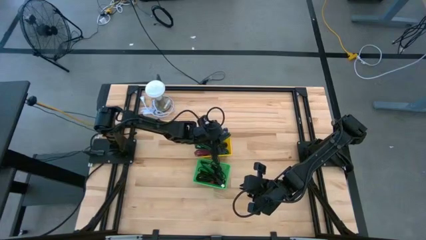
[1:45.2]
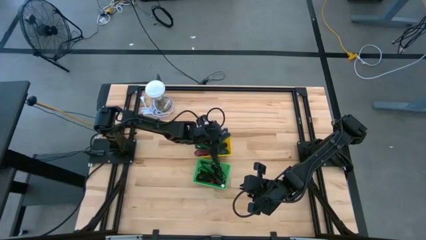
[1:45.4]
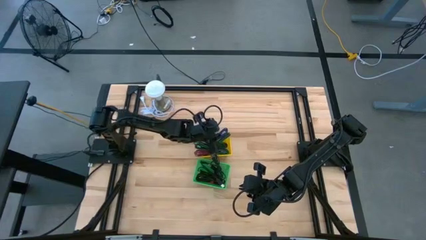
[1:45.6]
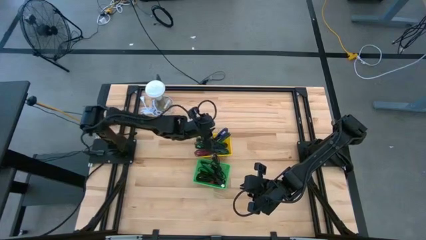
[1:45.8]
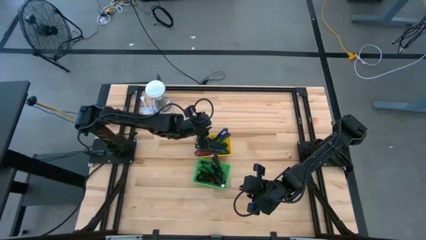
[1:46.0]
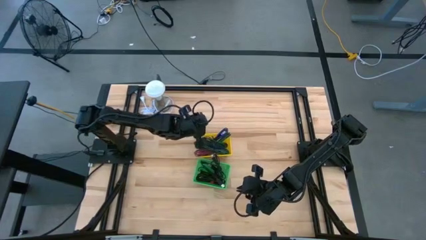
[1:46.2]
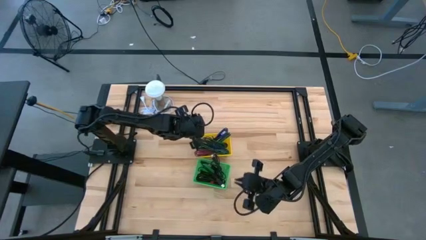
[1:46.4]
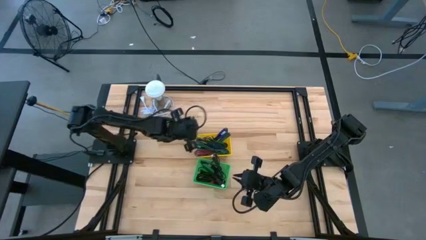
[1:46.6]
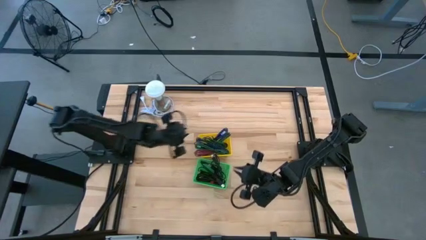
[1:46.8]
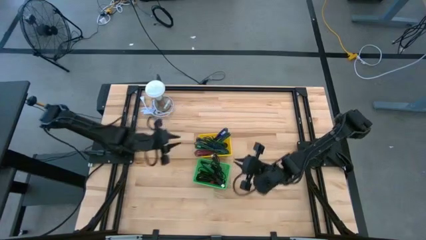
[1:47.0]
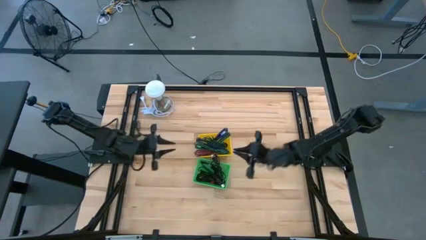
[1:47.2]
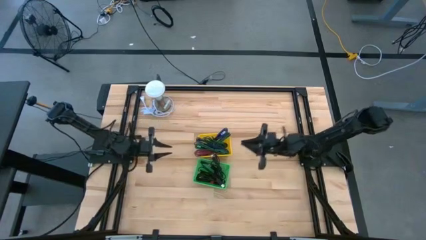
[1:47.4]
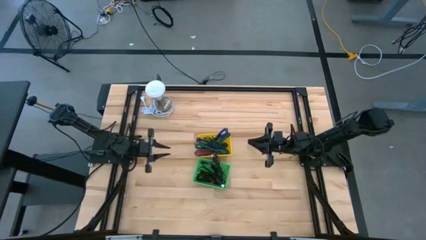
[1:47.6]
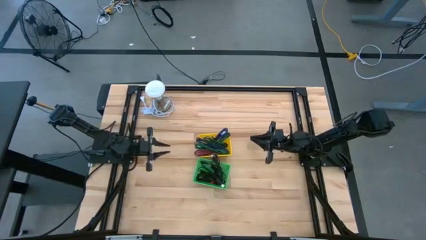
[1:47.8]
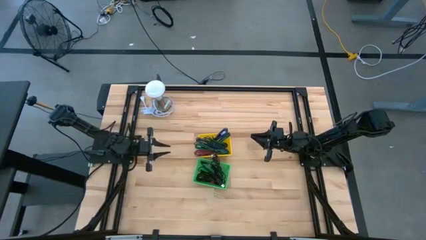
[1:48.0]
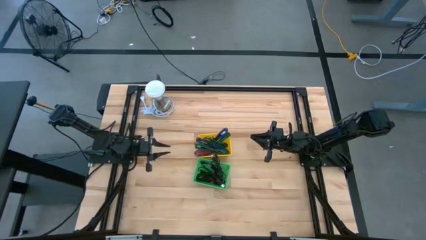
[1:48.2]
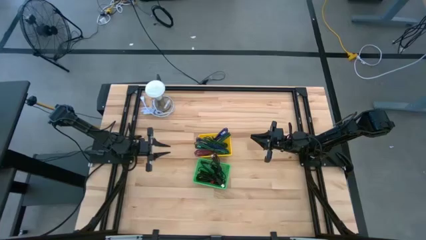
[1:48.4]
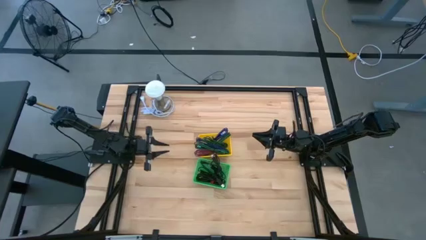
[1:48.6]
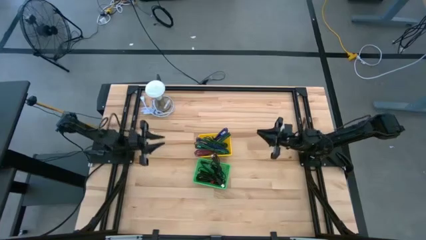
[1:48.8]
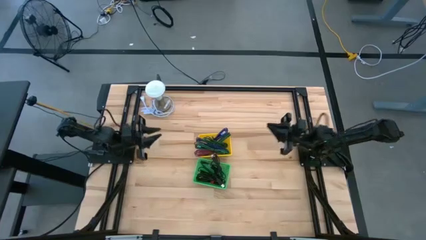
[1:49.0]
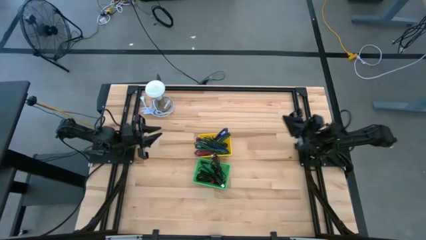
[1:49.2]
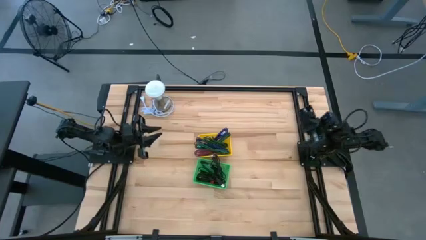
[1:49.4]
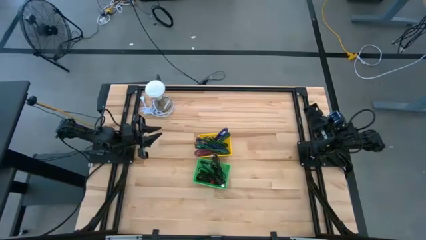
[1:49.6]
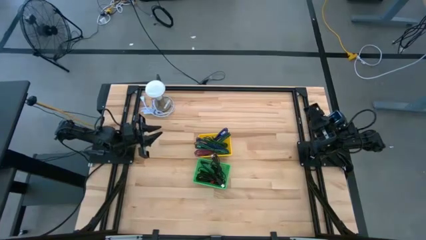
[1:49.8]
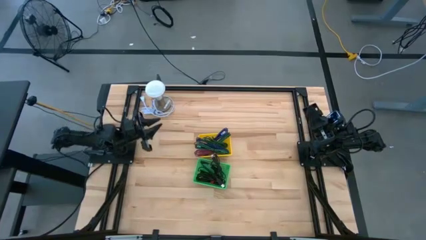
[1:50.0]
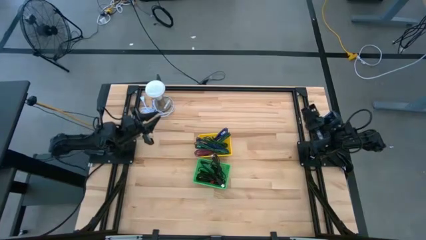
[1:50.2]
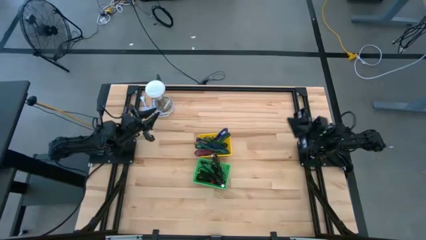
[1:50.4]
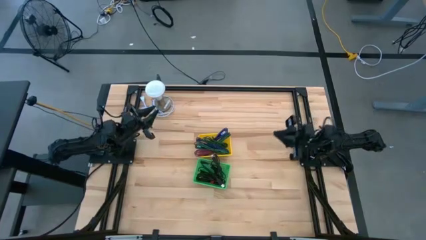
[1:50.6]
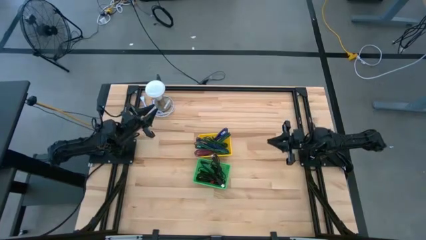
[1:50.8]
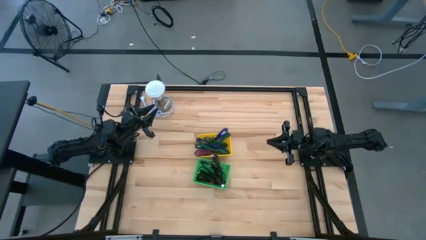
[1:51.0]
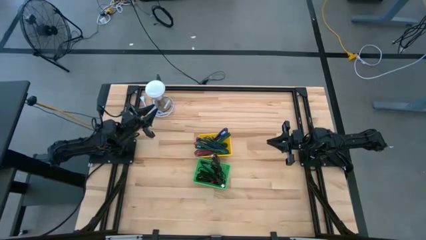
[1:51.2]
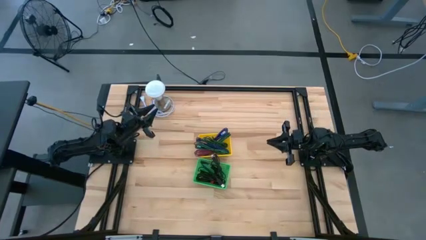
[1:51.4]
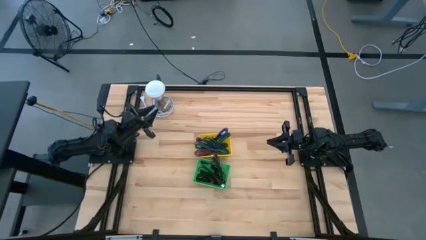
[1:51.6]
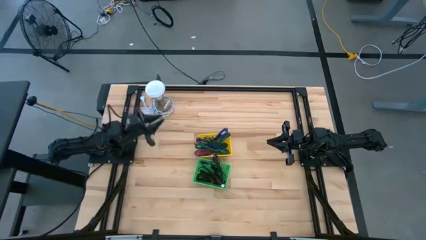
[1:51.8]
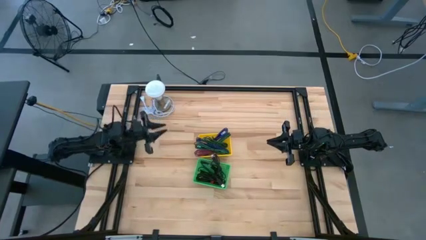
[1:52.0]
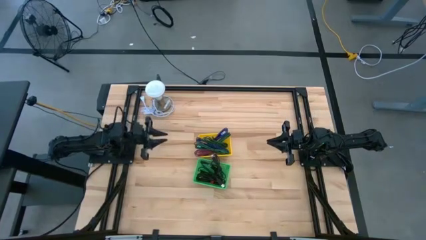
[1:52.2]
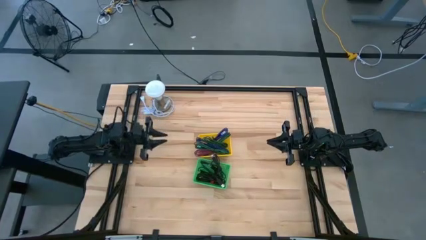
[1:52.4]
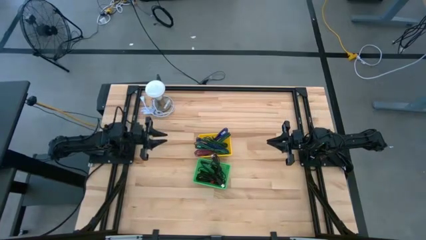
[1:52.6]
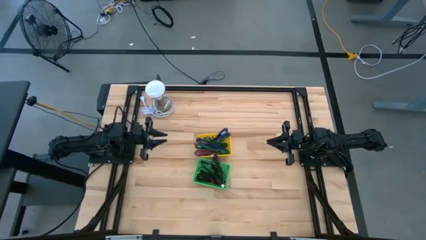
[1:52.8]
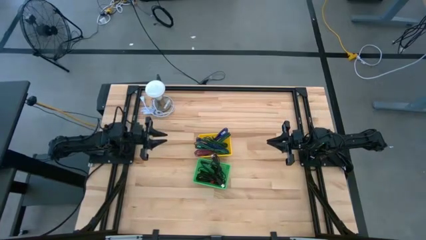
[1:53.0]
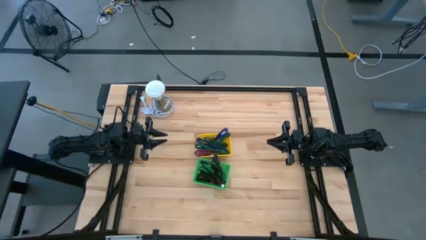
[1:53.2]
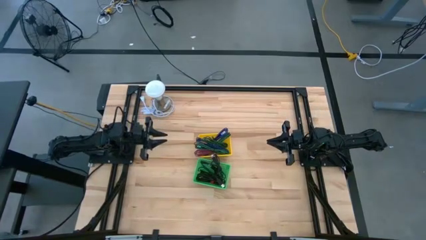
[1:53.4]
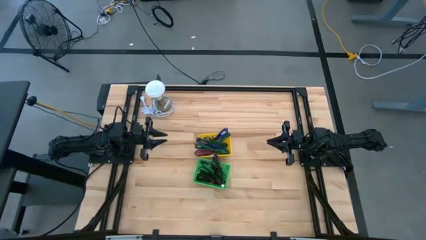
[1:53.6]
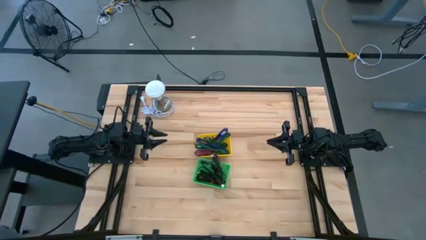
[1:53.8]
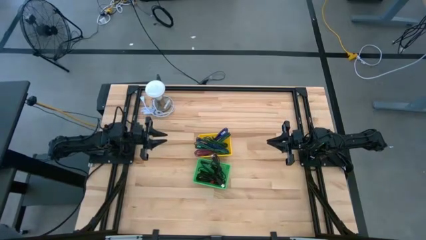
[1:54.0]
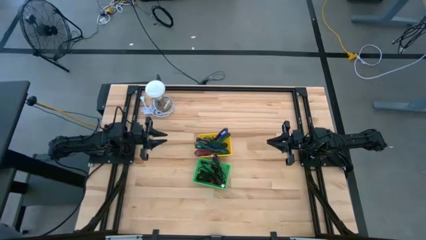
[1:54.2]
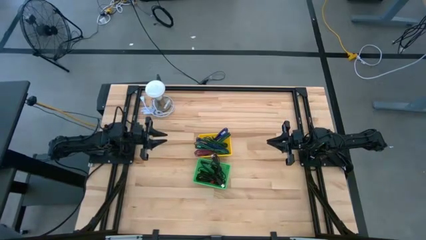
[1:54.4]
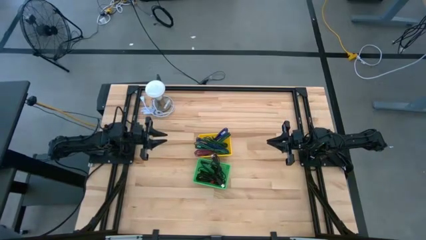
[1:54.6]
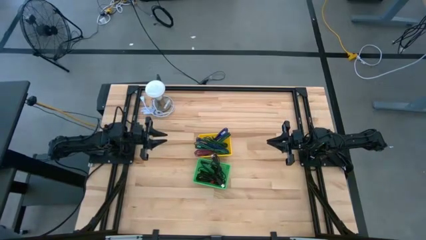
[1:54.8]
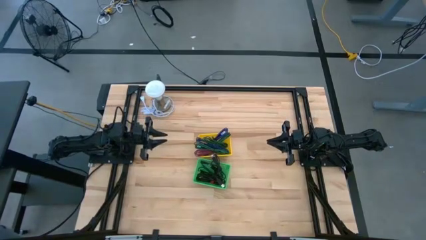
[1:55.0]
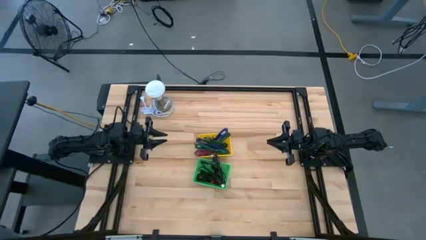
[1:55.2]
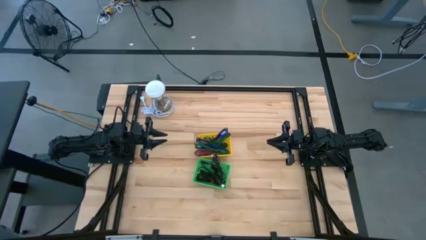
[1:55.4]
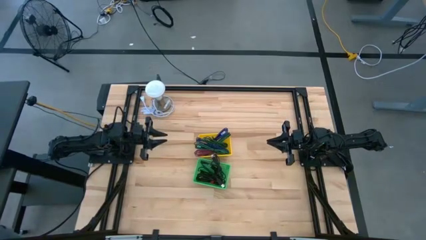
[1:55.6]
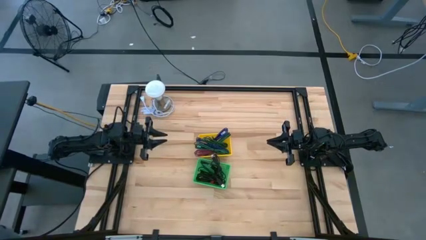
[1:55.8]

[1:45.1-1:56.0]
Task: Pick & Place USB Port
Return to Home Position
